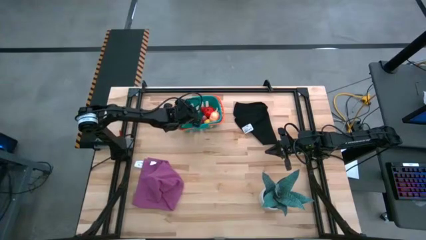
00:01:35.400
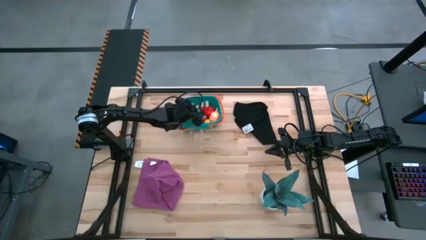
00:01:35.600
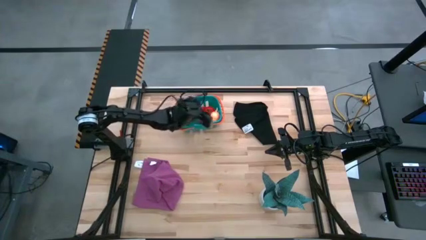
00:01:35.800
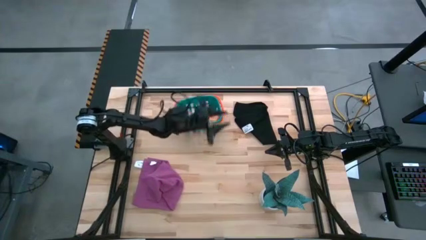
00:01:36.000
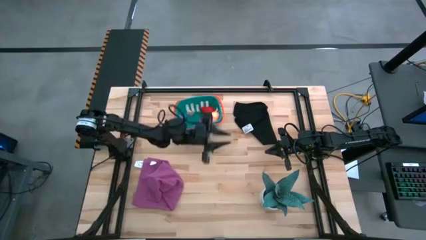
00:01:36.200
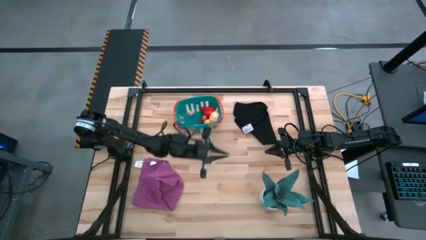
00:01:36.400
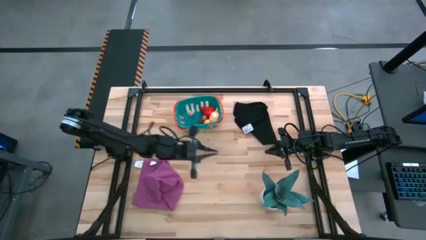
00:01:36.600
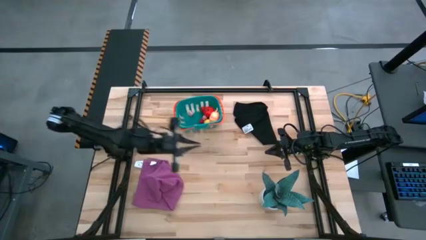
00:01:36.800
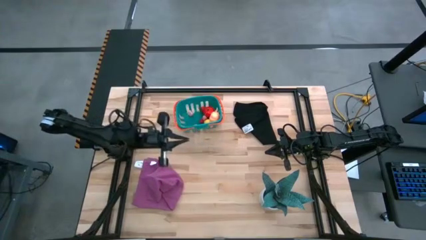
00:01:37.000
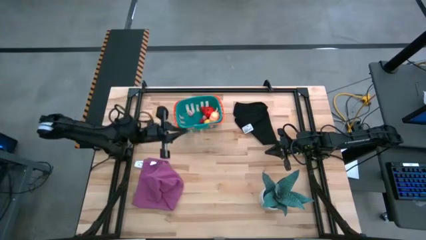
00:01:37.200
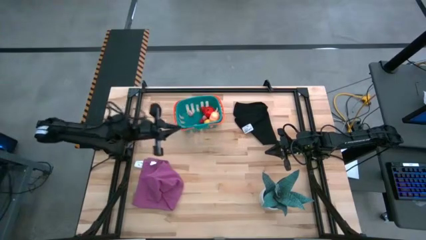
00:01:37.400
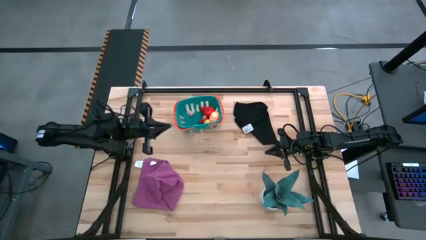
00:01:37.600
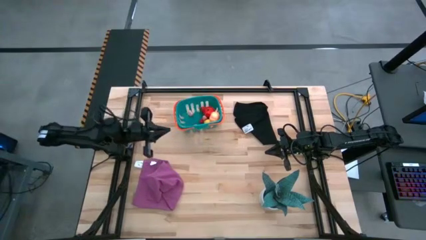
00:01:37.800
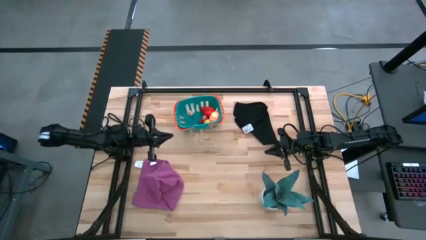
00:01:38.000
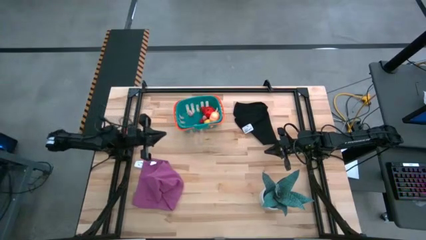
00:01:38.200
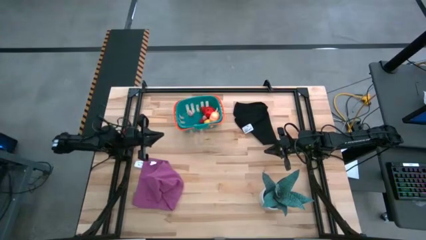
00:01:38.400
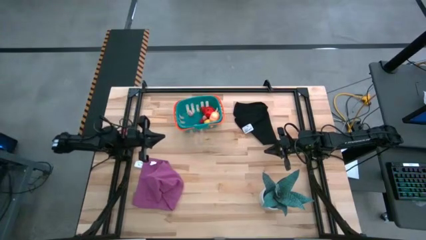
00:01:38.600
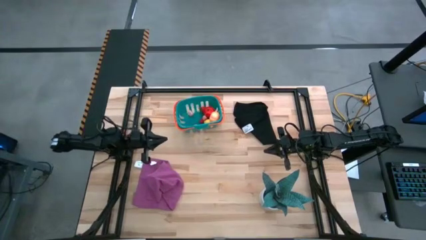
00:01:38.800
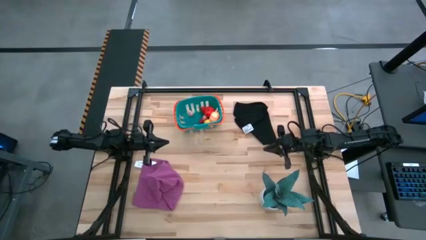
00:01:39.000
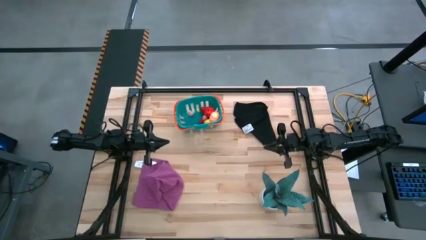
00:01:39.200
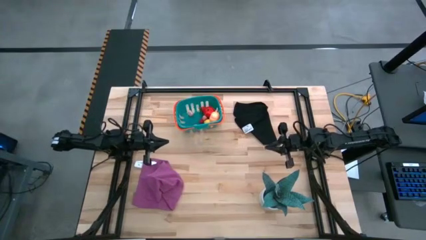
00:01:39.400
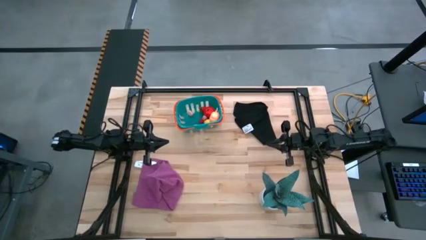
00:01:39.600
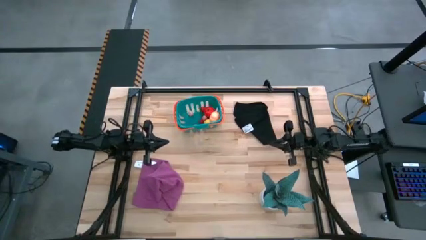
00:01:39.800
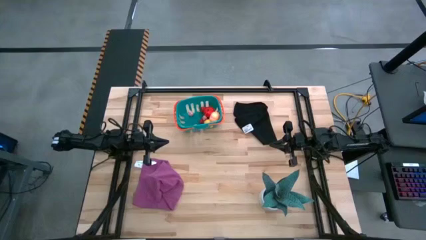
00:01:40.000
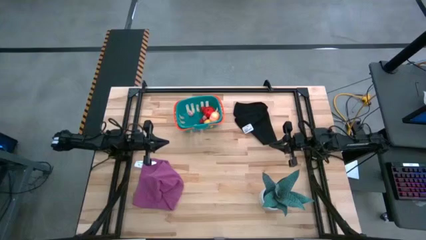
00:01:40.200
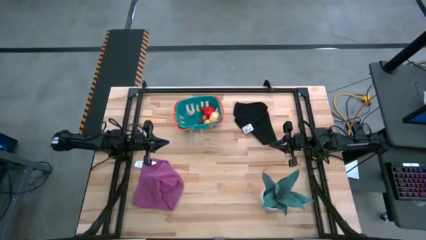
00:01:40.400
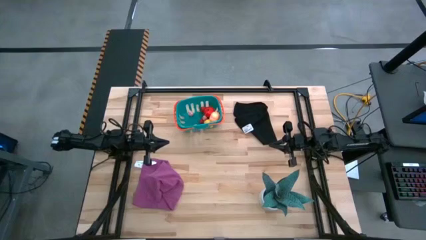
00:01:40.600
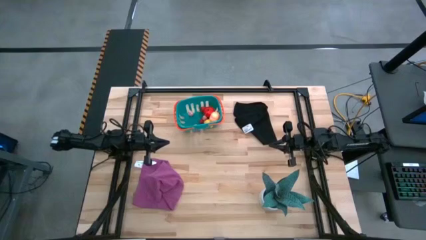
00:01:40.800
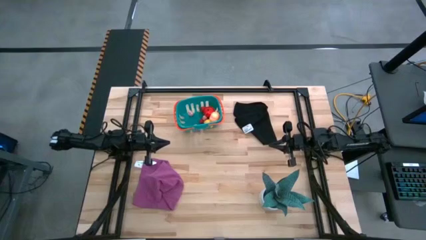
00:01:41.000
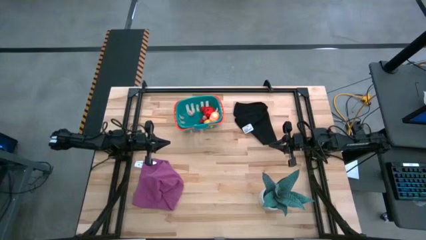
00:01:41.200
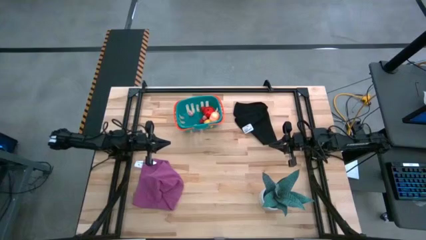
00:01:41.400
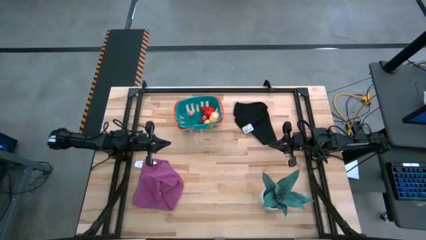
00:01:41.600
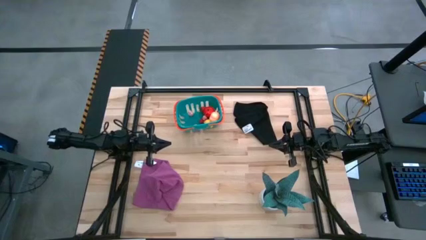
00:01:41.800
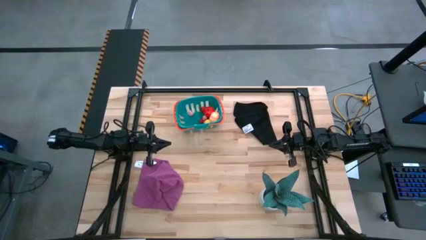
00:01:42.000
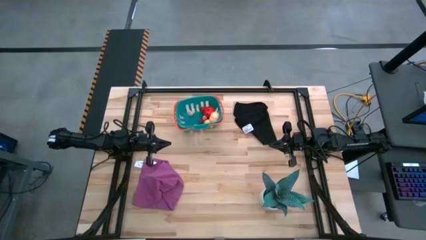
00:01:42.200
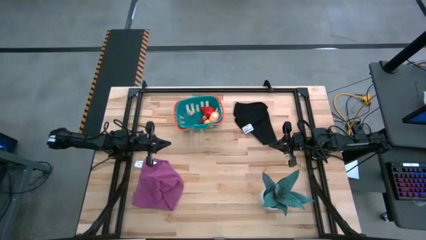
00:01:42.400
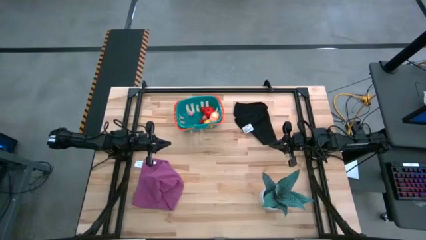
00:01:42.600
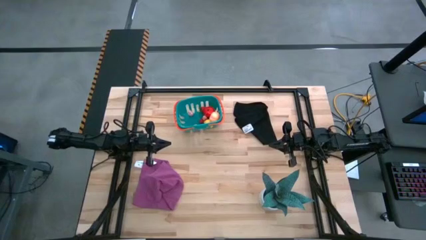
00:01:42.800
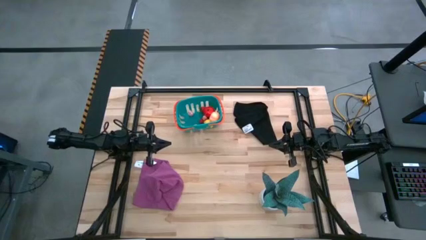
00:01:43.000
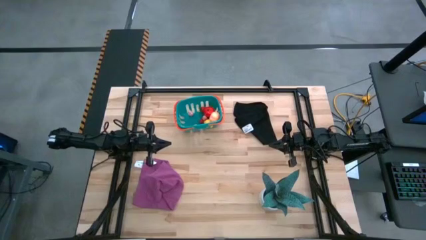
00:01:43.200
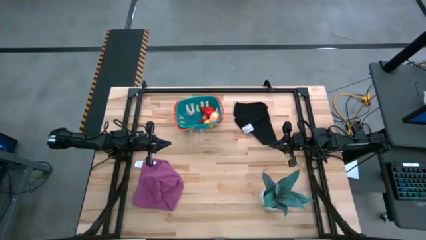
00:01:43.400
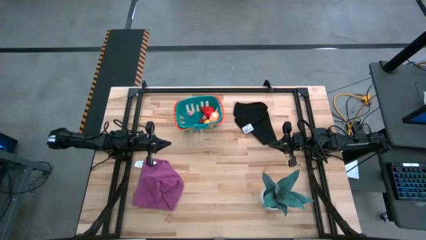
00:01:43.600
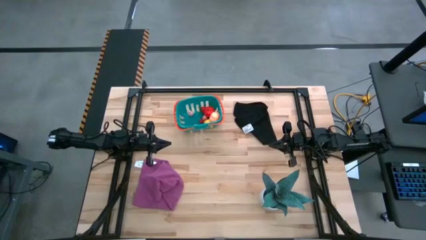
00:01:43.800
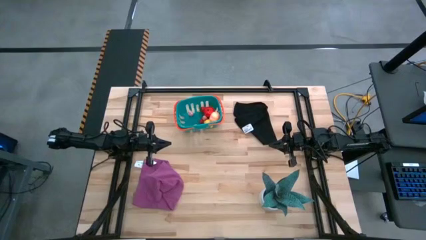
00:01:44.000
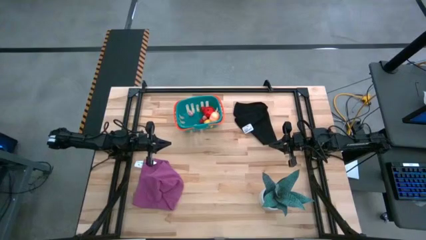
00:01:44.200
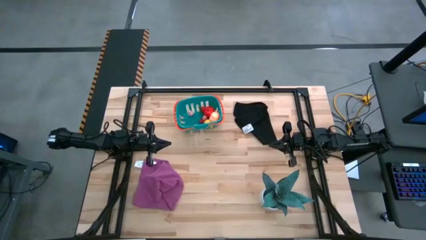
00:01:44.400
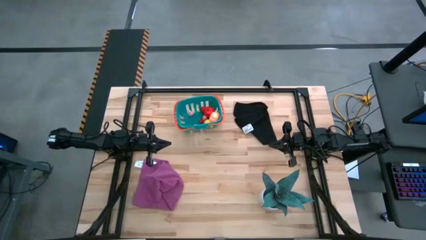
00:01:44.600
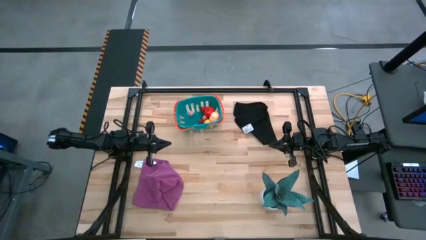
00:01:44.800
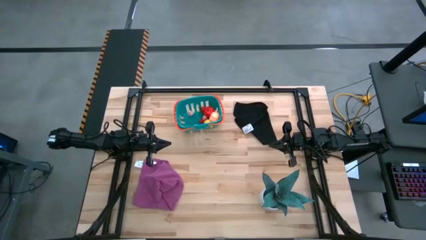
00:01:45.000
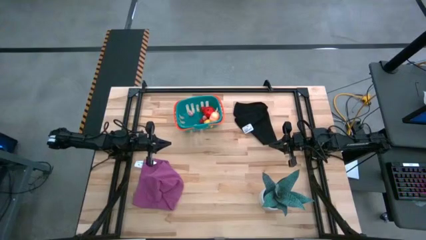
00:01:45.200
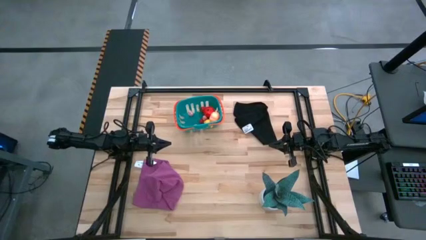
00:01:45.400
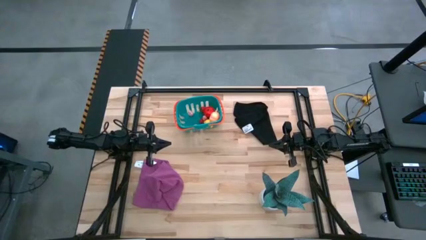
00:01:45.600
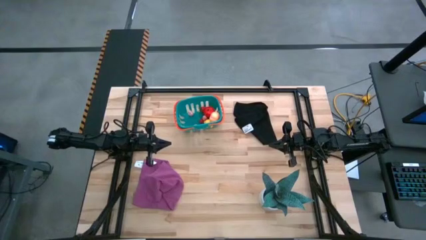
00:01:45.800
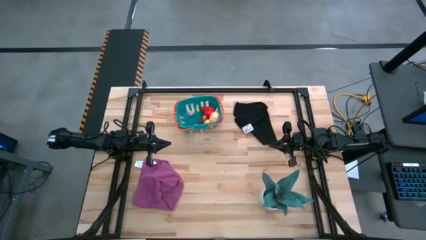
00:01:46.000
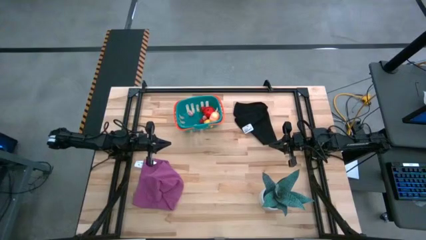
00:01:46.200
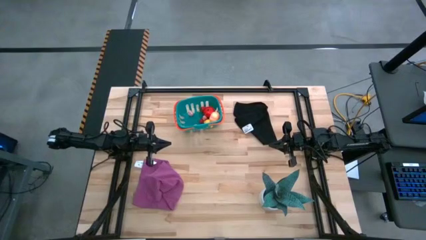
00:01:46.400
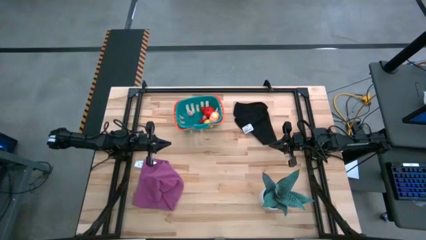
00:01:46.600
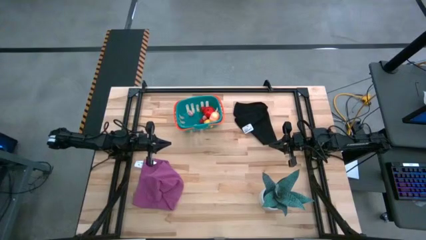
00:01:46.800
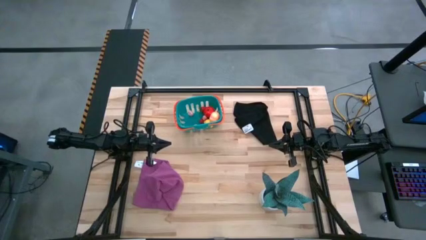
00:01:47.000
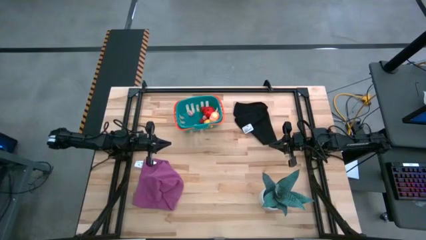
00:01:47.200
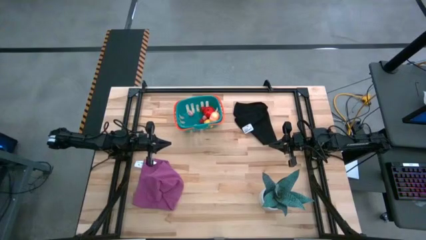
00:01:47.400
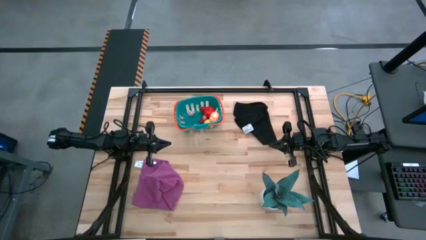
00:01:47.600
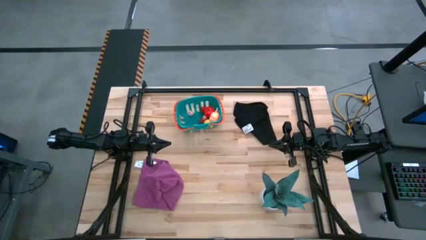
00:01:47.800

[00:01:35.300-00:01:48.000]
Task: Pick and placing Produce into tupperware
Return to Home Position

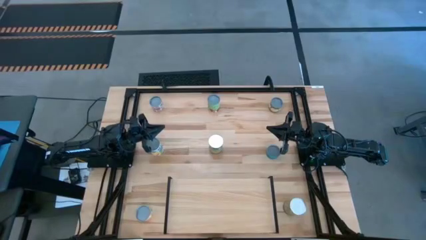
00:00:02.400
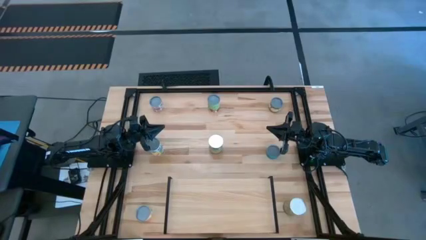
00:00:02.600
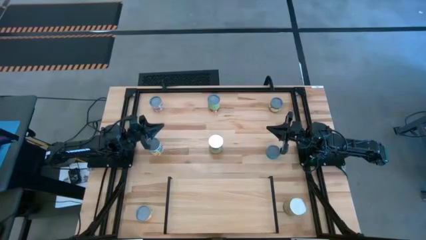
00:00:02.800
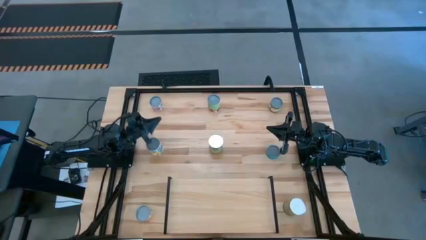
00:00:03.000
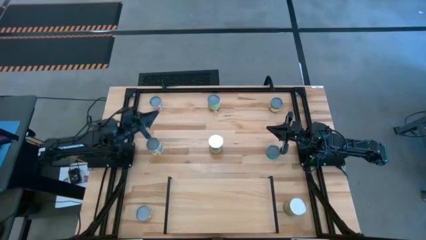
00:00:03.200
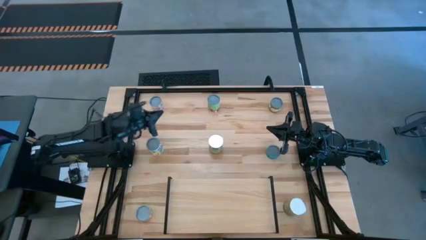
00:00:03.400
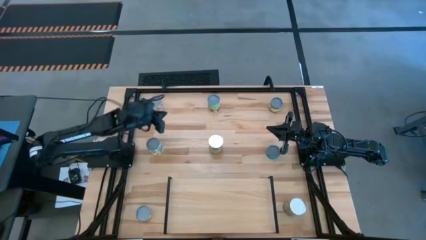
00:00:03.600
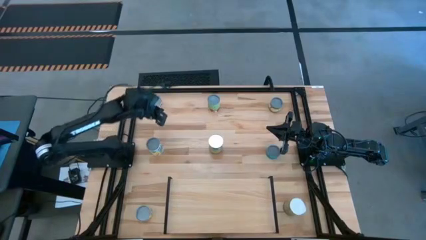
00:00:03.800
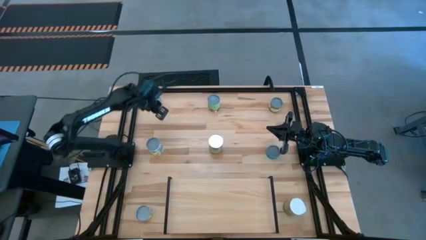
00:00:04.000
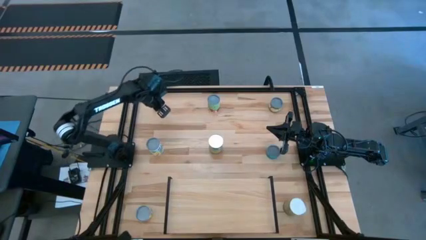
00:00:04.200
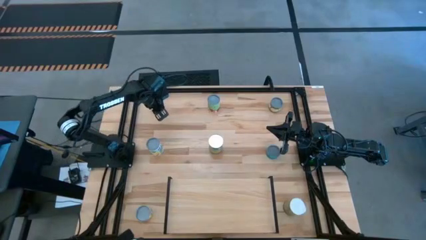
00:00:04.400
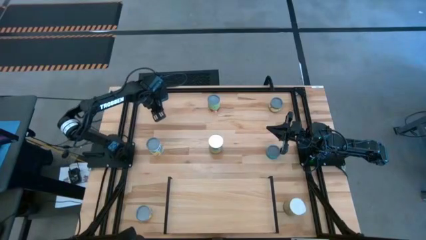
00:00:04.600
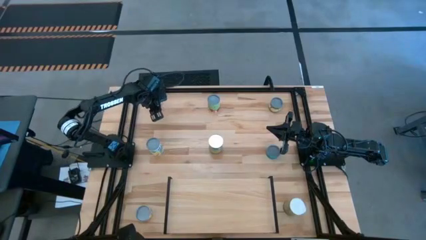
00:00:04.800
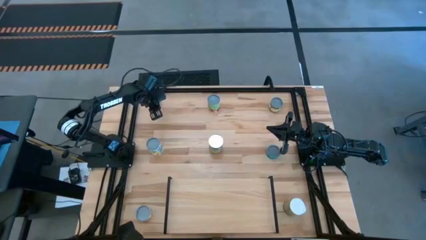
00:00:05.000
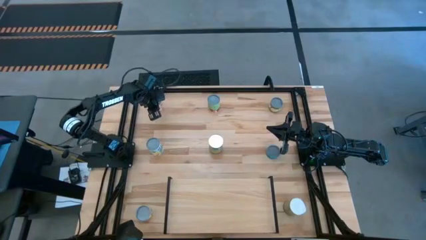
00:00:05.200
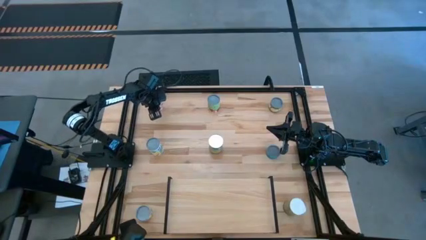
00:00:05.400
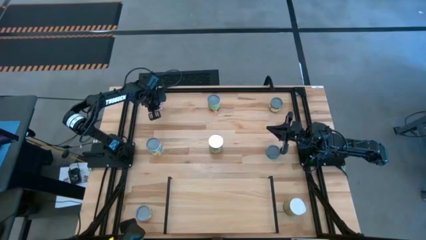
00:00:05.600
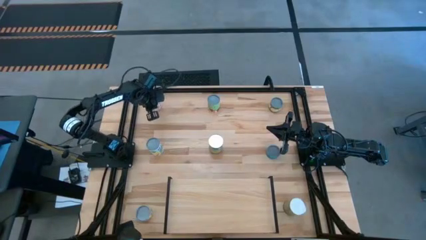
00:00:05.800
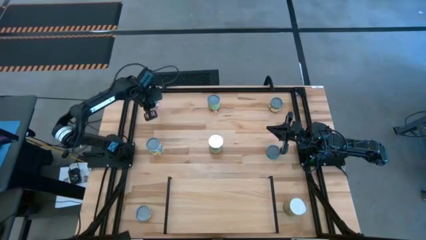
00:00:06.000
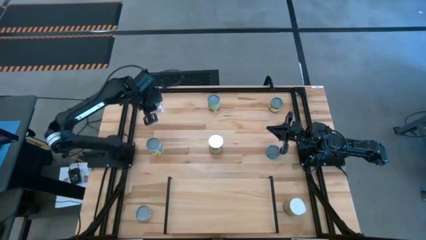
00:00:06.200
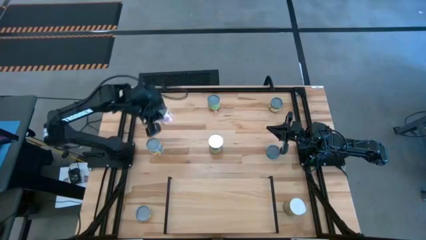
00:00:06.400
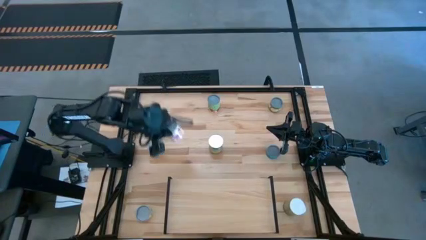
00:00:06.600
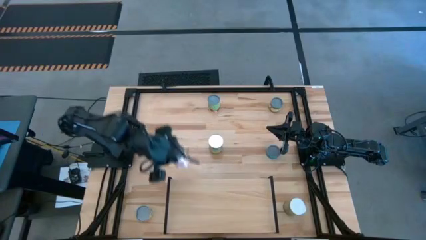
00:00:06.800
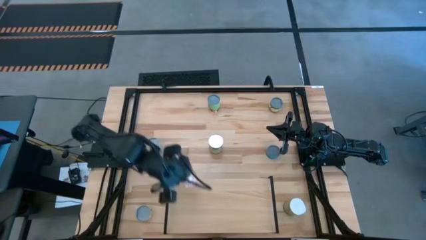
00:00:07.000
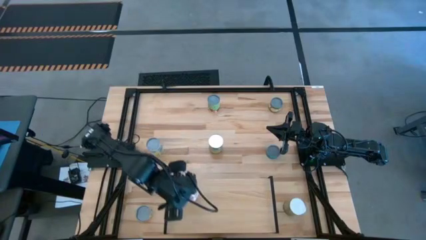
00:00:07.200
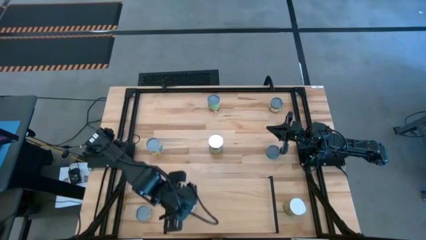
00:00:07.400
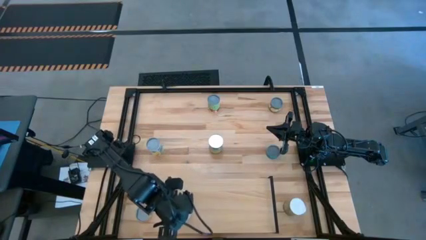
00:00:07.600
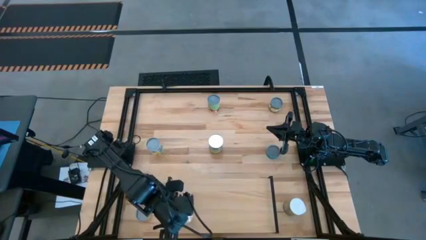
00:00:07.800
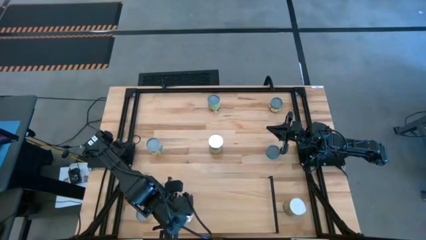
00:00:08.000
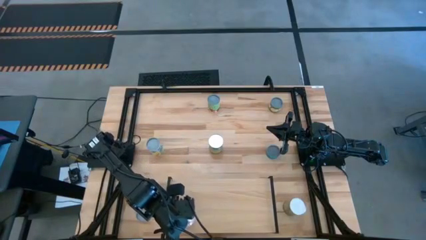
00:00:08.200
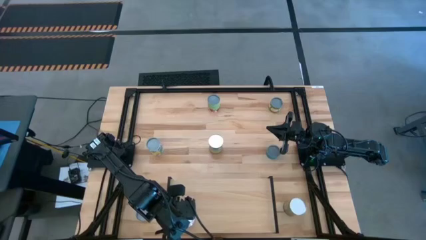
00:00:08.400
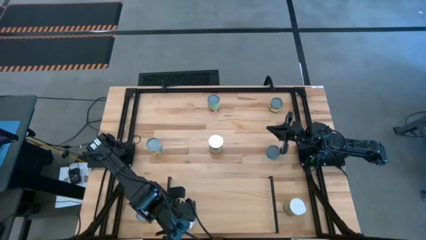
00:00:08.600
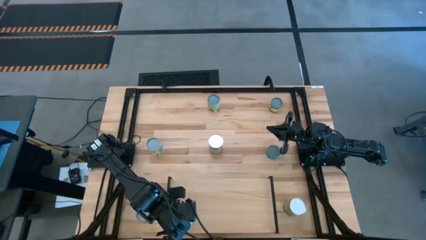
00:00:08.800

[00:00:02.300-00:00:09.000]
Task: Pick and place cans onto a shelf
Put the canned tomatoes on the shelf
